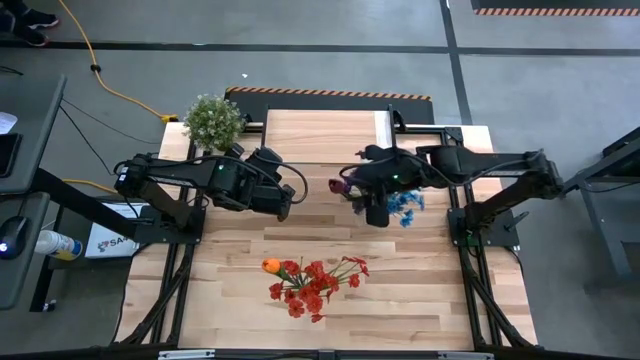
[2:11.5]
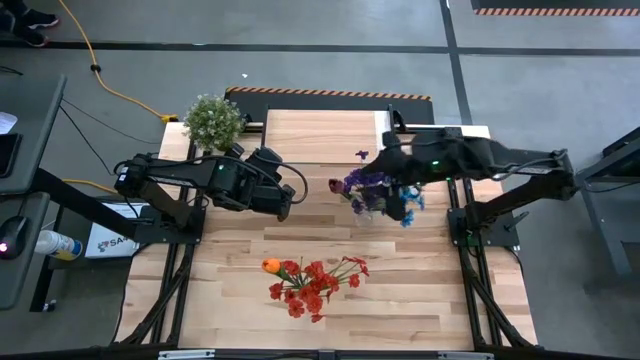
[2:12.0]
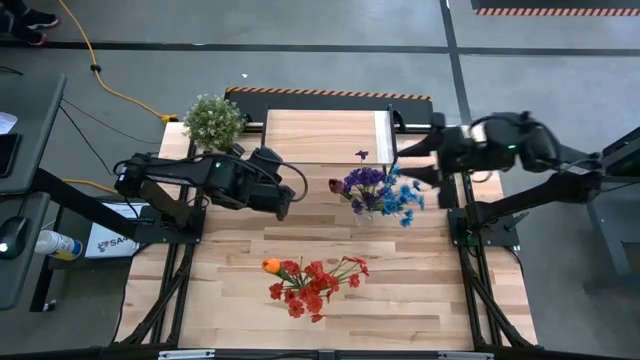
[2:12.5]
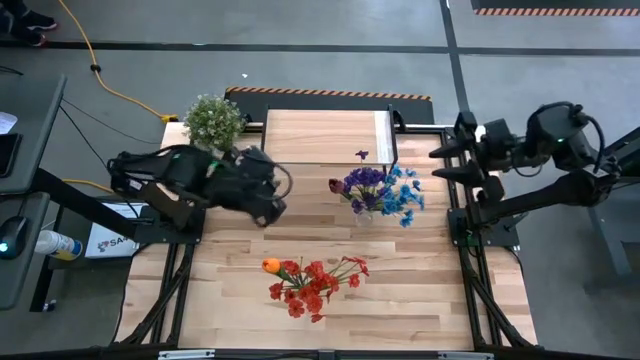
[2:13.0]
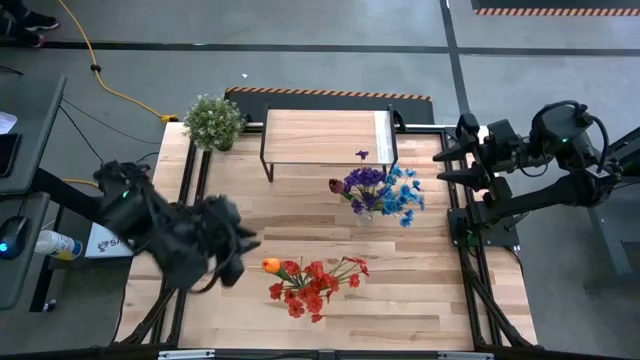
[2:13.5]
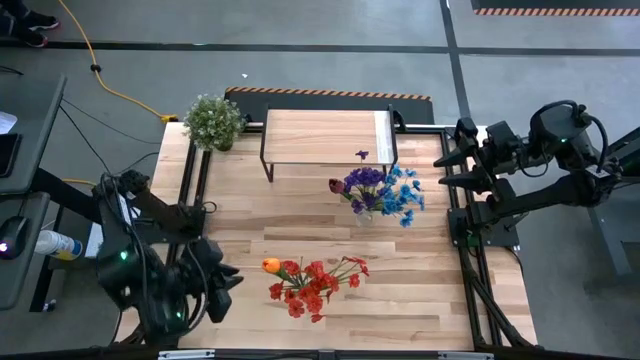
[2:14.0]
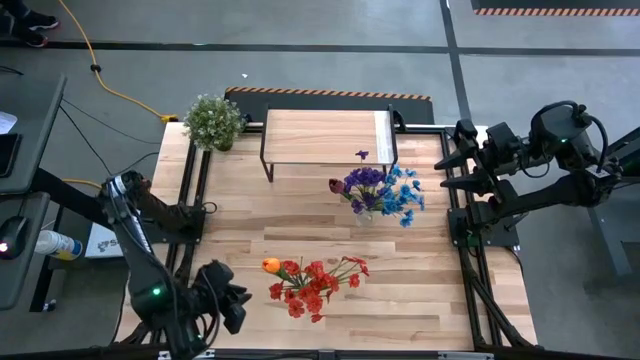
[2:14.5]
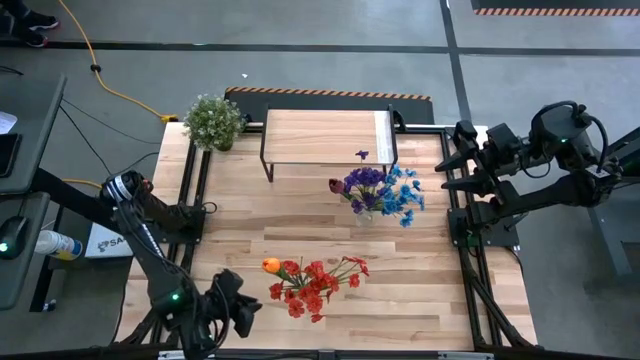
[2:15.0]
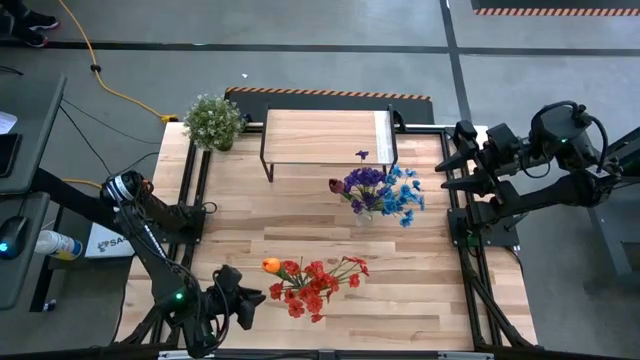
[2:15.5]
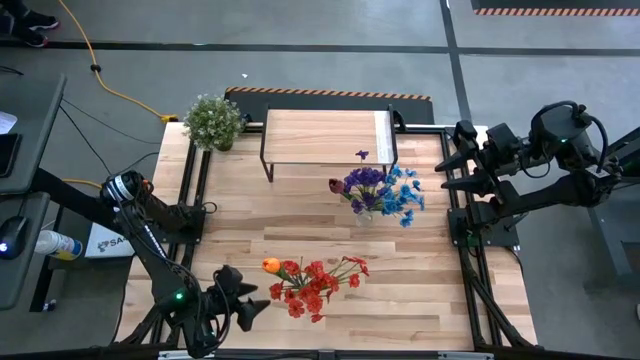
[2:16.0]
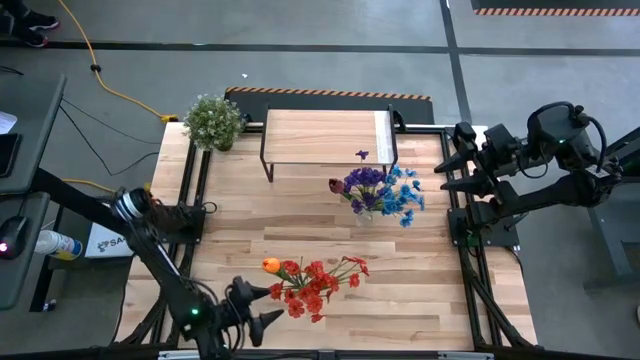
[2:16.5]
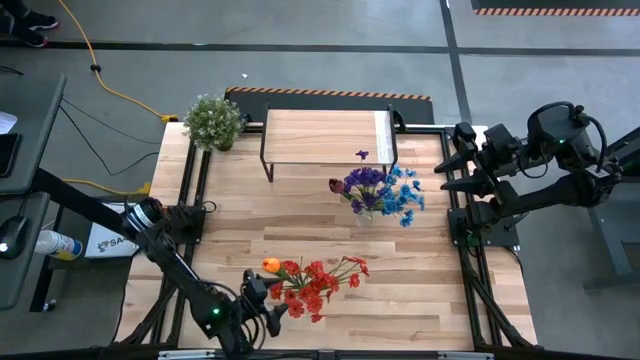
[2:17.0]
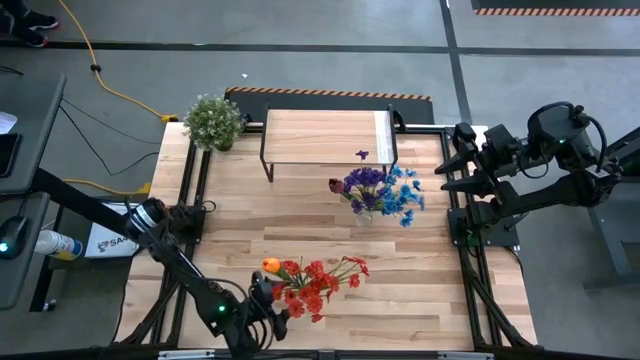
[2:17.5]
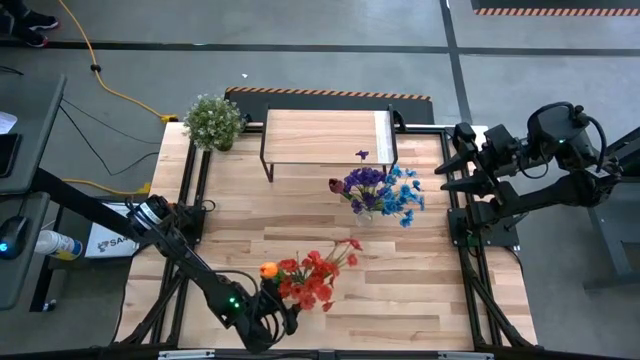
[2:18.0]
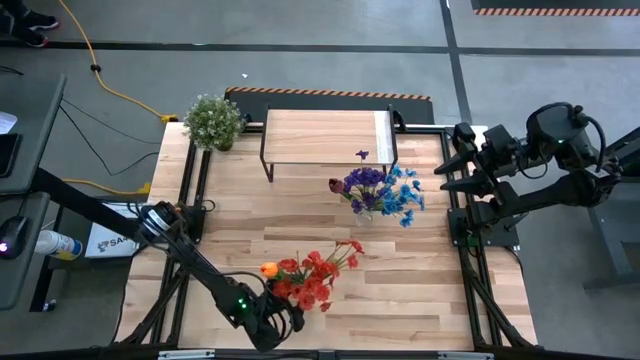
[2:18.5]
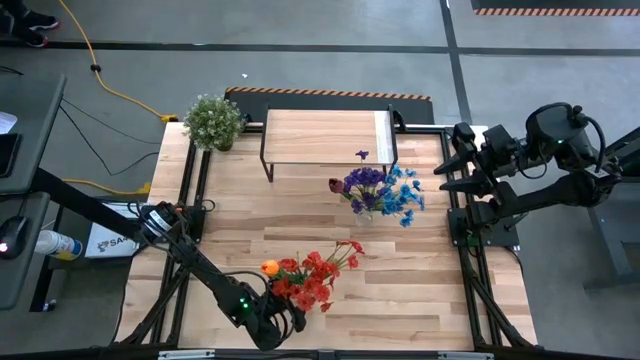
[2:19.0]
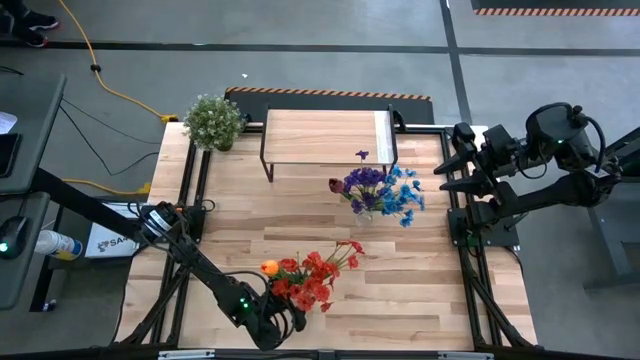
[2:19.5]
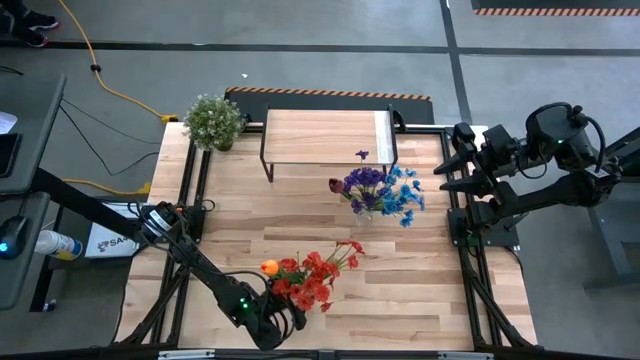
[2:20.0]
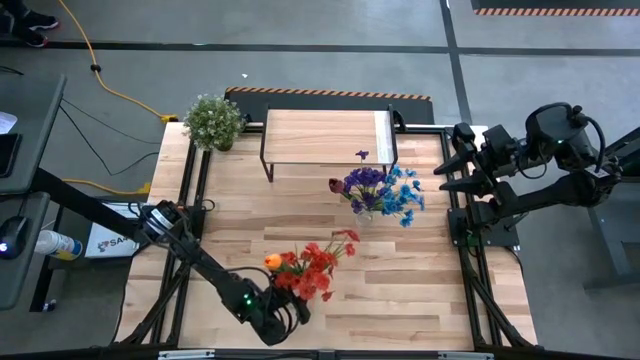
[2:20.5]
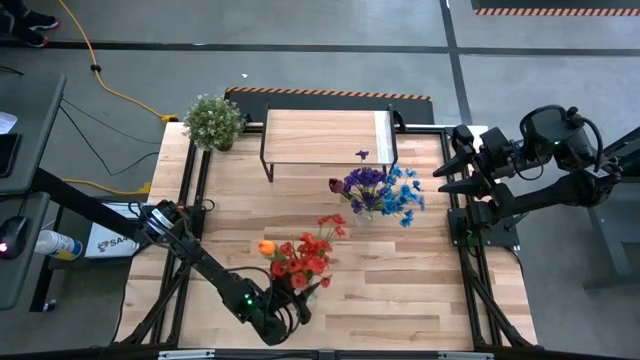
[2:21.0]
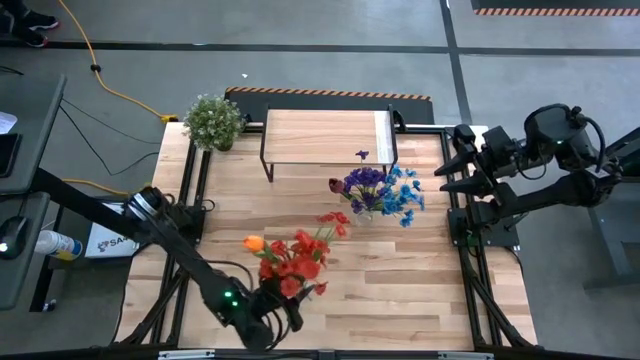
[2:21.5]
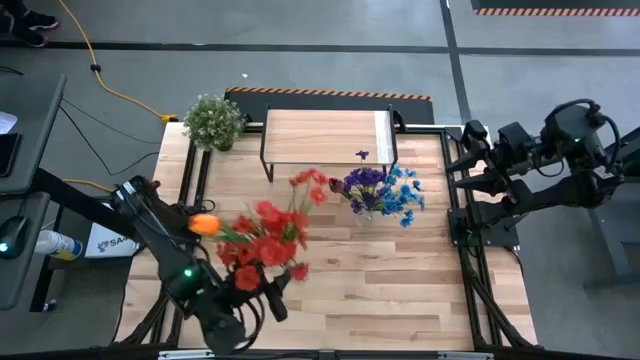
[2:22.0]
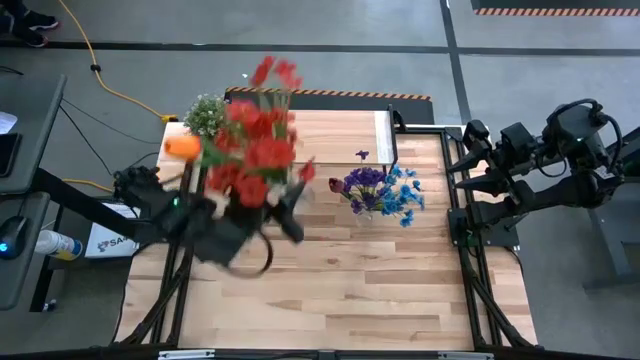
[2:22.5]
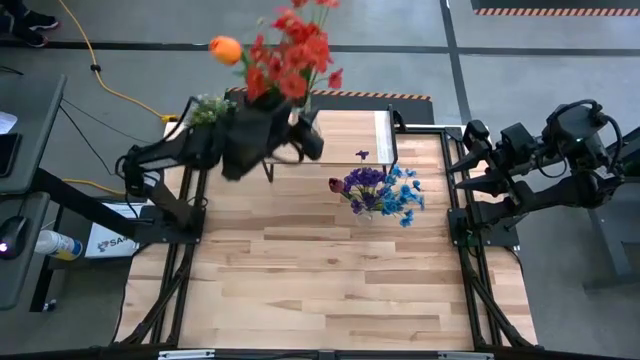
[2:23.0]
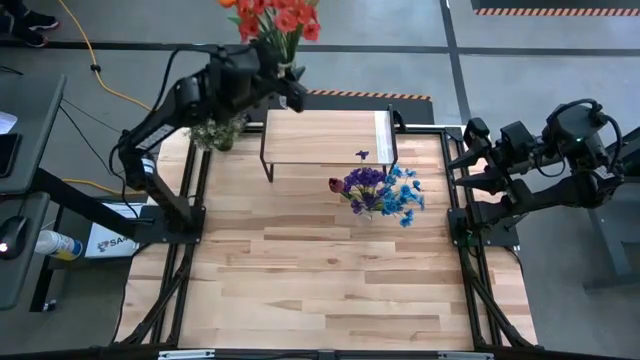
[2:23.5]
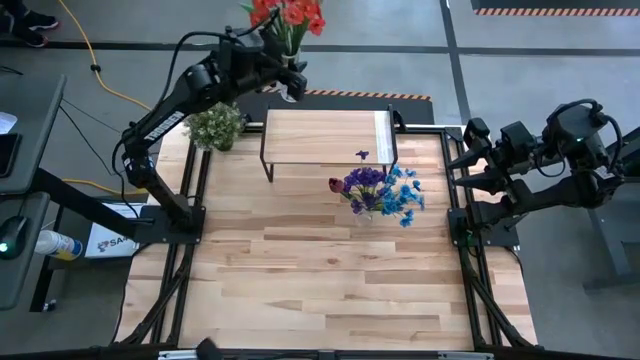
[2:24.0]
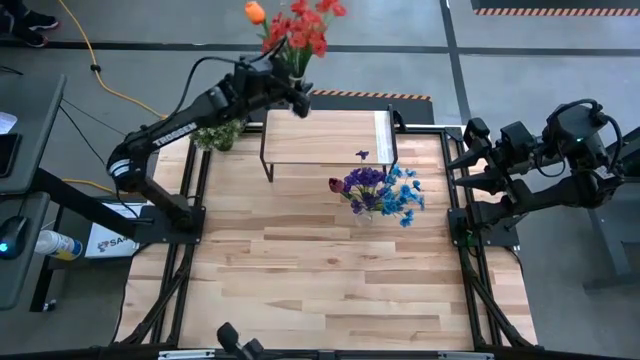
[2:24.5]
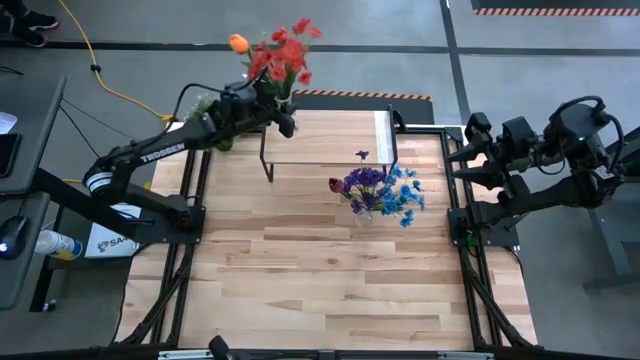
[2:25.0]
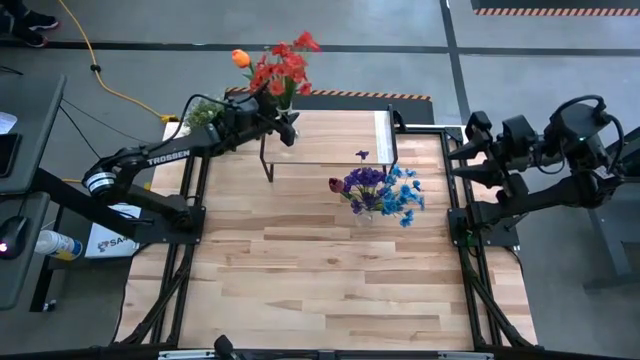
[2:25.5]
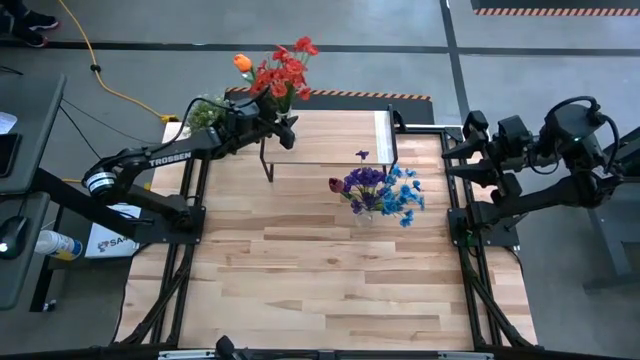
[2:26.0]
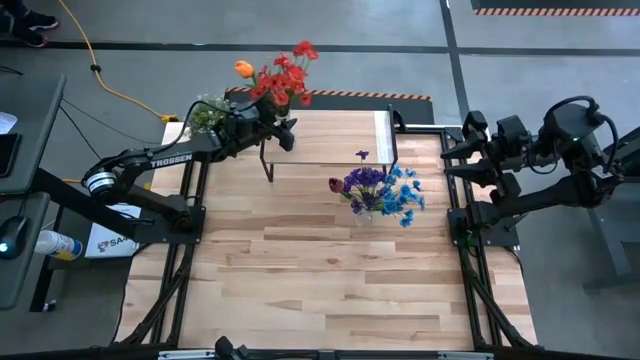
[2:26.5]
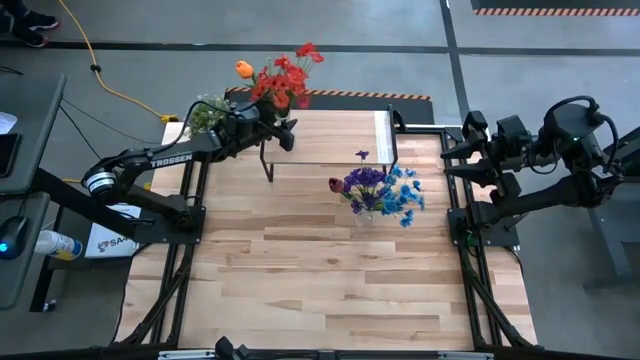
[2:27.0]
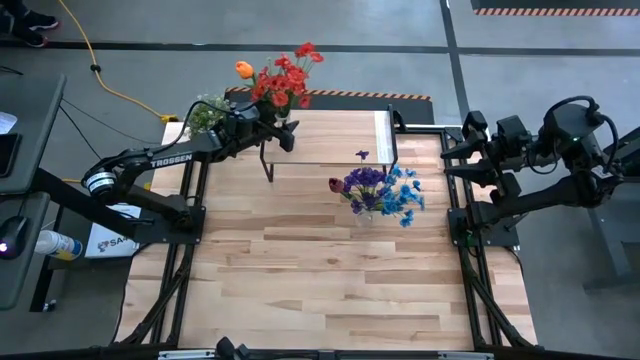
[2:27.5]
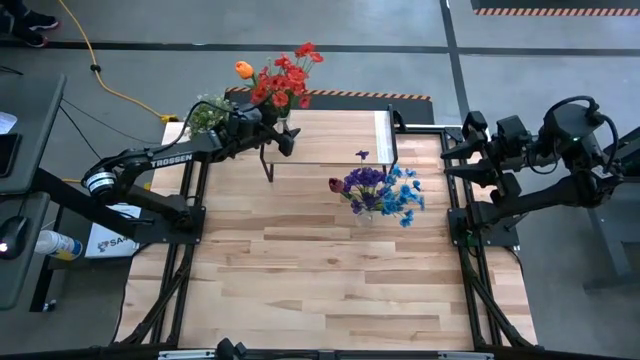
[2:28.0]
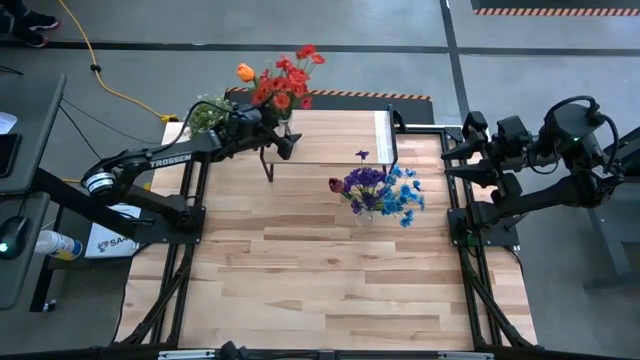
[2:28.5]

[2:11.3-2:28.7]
Task: Pick and place flowers into a vace then onto a shelf
Put the bottom transparent vase with flowers on the shelf

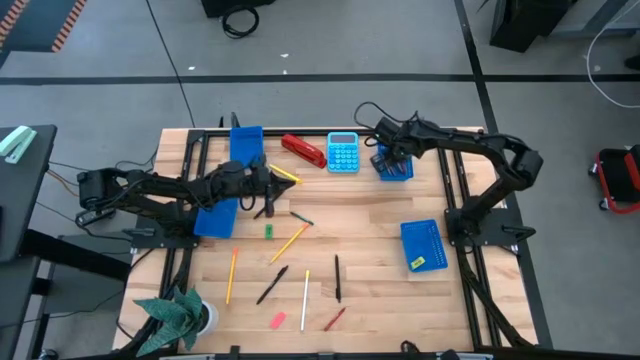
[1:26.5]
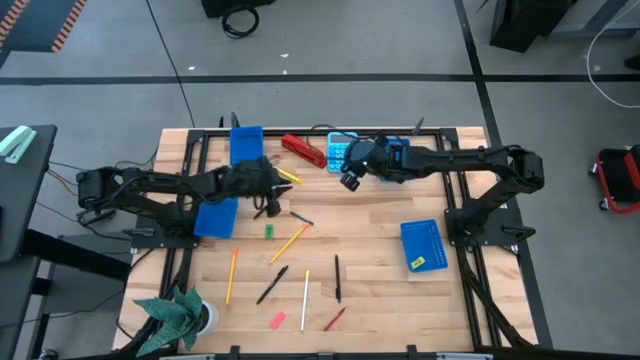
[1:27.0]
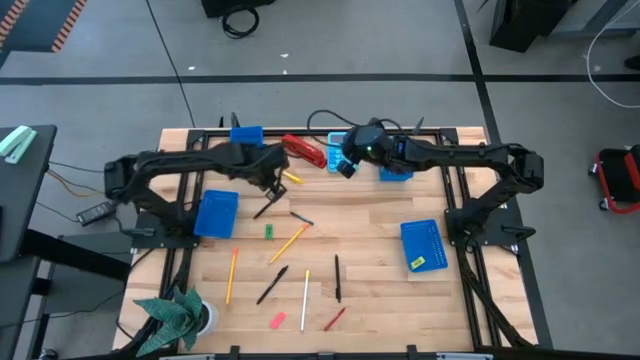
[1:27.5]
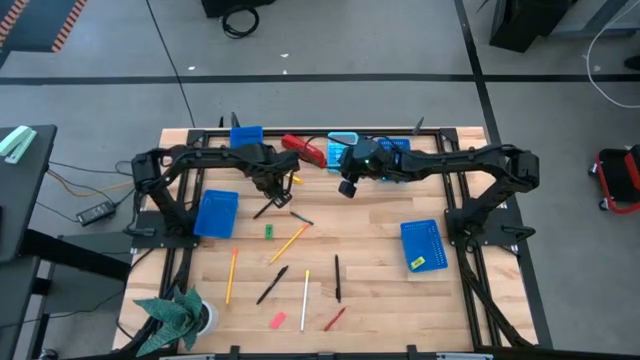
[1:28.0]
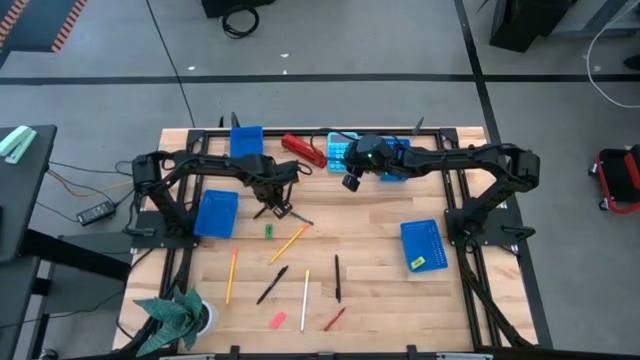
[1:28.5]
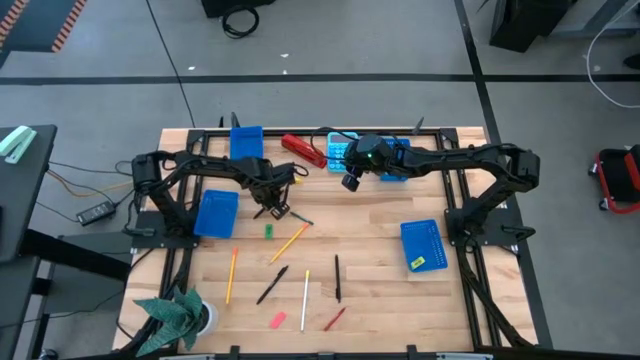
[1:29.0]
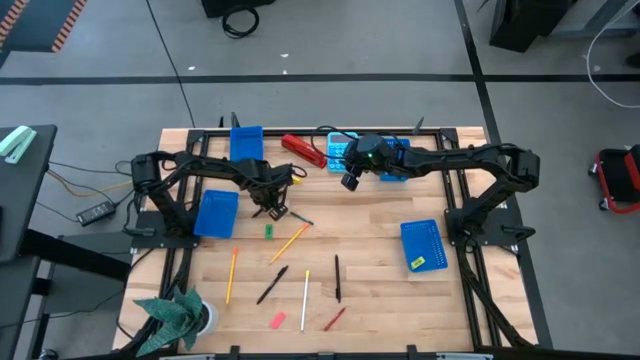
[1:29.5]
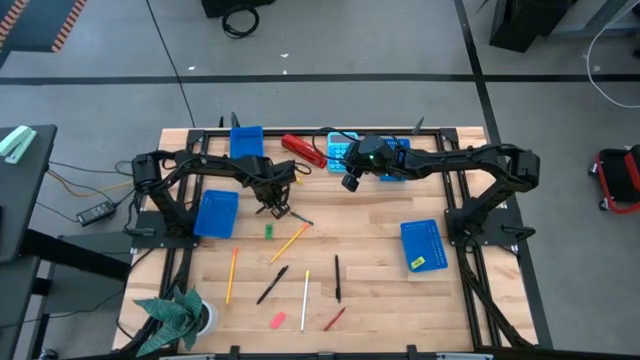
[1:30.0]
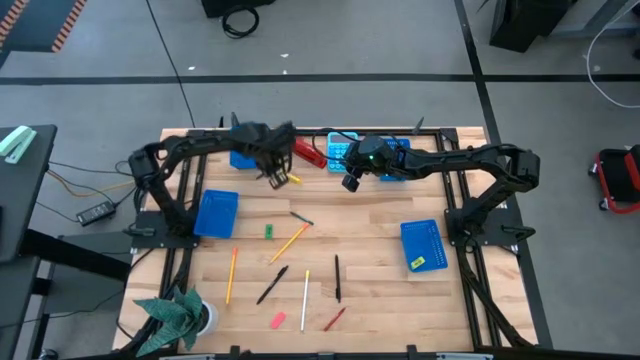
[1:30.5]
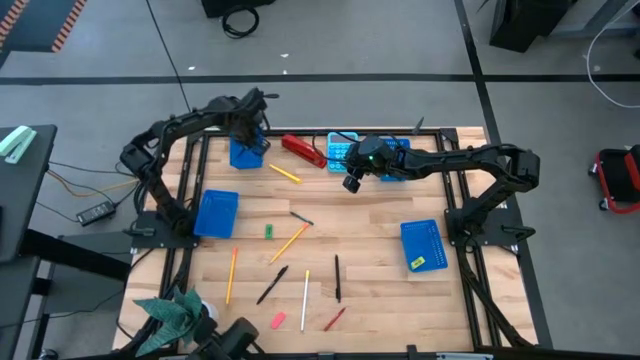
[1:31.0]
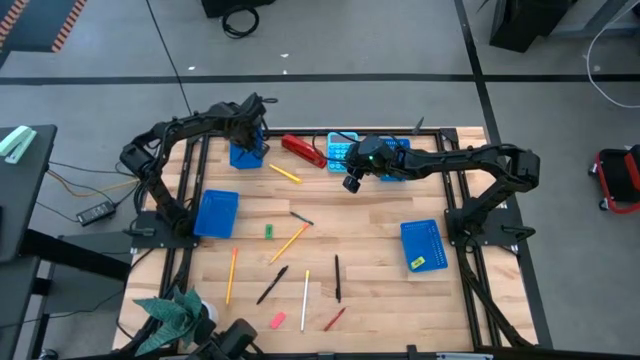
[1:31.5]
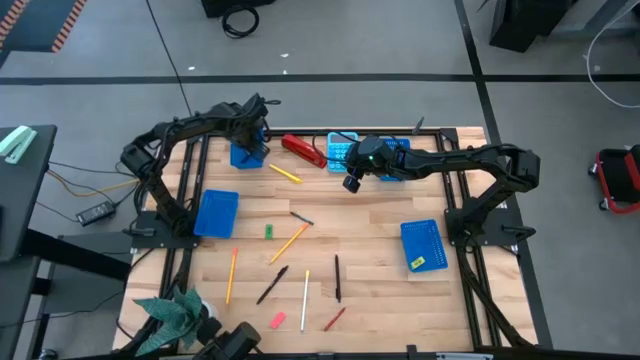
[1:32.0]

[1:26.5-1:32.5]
Task: Sort crayons/erasers/pens/pencils in bins
Put the top black pen into the top left bin
